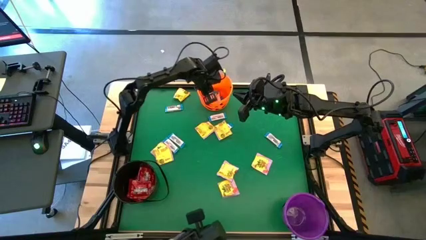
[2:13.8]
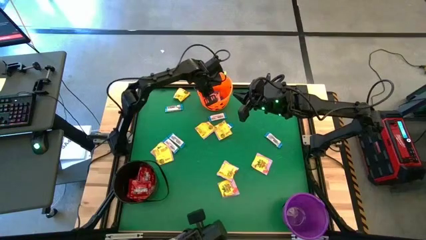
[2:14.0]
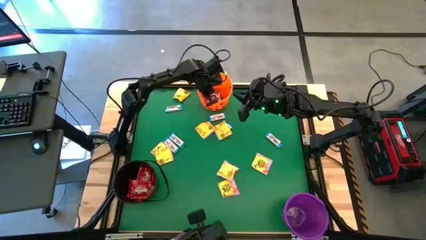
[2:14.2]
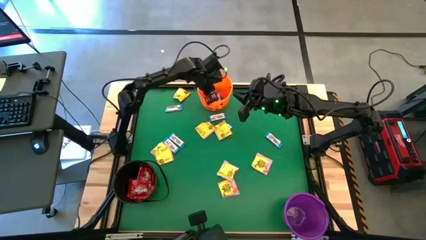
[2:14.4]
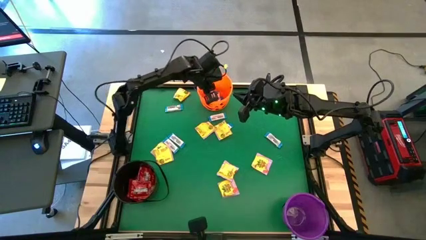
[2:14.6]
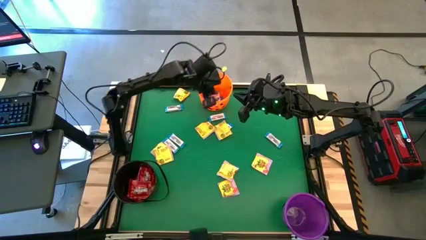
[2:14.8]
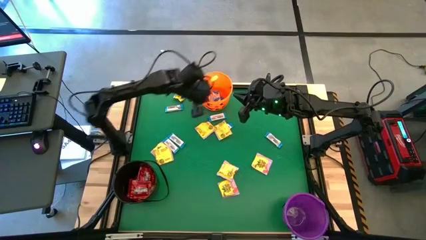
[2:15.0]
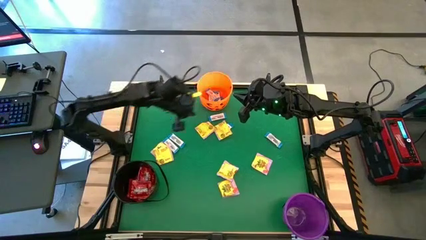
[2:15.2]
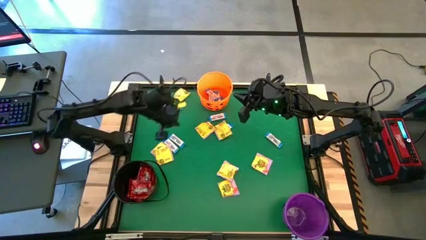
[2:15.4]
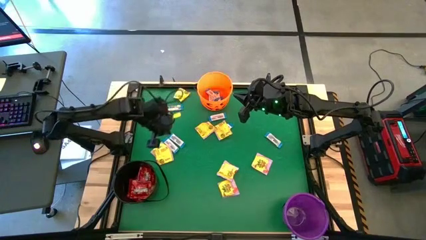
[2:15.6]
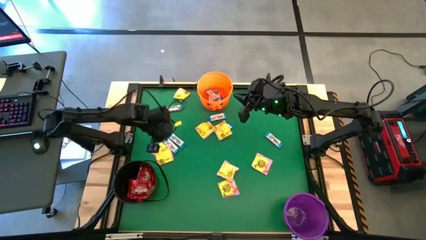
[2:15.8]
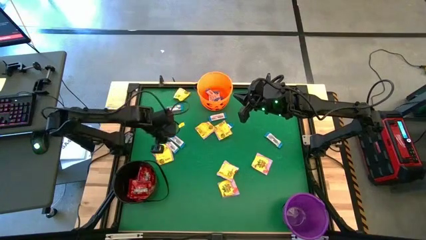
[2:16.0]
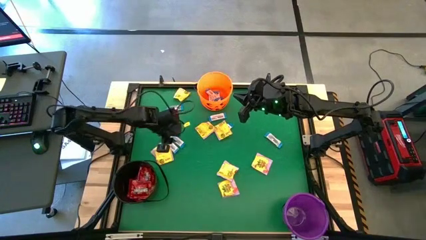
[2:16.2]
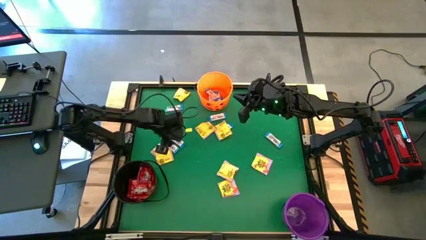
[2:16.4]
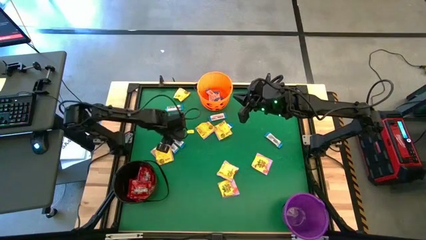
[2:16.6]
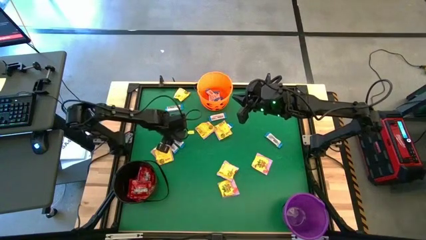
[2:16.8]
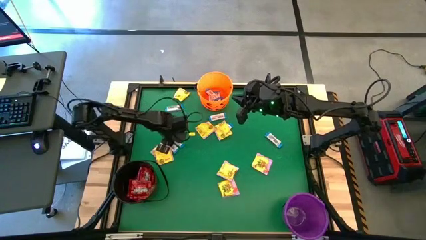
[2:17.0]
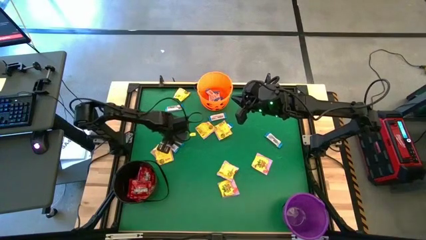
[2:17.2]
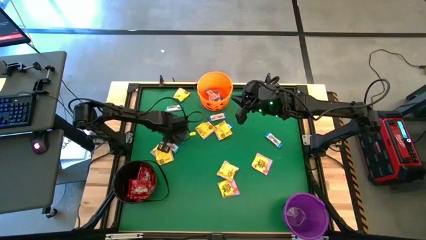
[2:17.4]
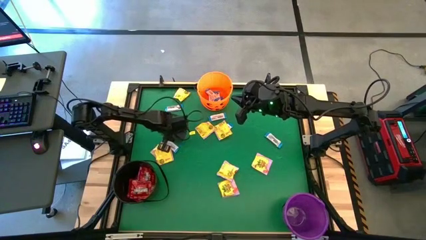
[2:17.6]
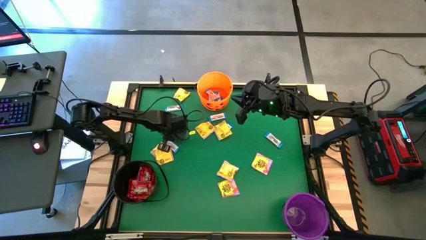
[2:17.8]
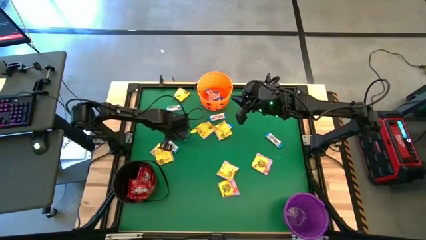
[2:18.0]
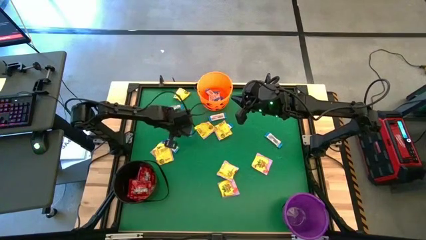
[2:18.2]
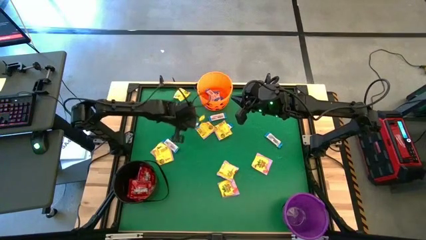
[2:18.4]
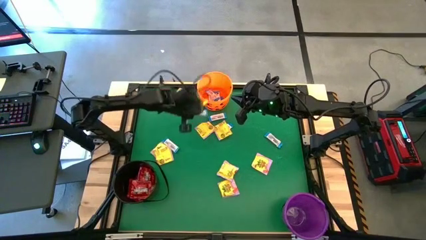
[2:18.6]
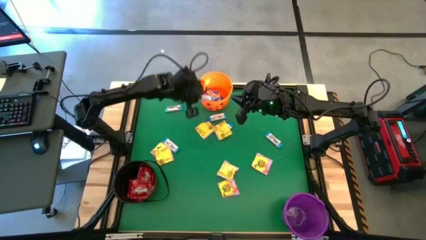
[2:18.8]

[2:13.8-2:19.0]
Task: Sort candy by brand, put in halloween buckets
Put the white chocolate into the orange bucket

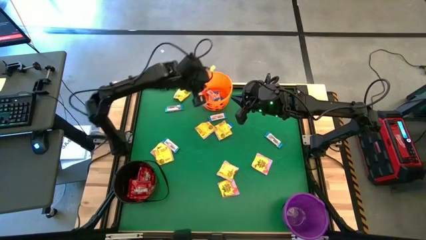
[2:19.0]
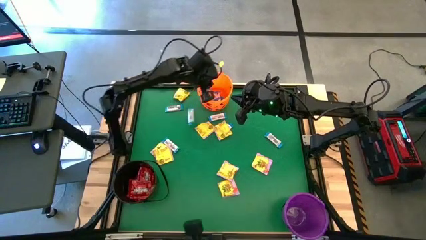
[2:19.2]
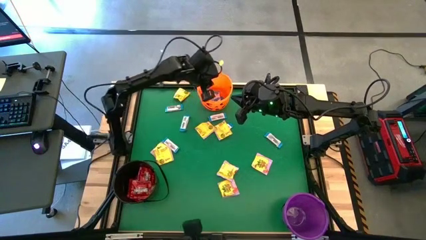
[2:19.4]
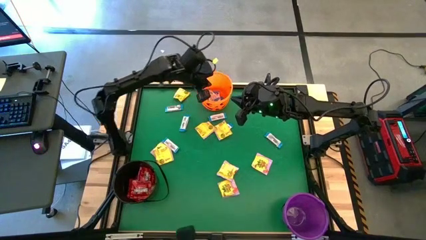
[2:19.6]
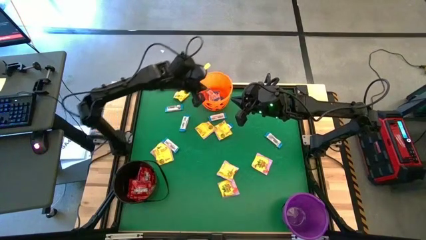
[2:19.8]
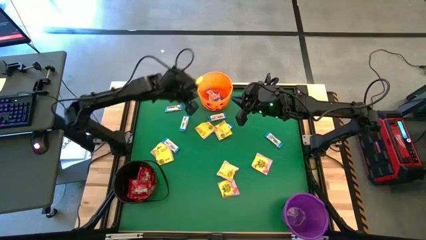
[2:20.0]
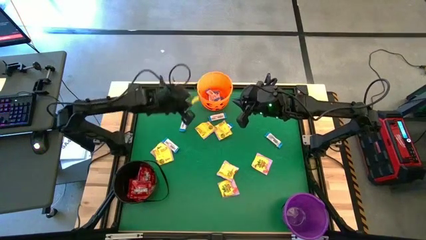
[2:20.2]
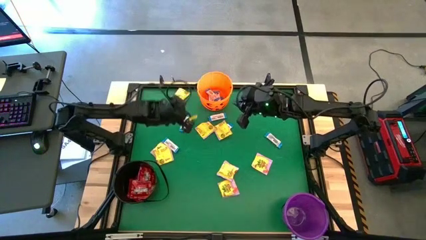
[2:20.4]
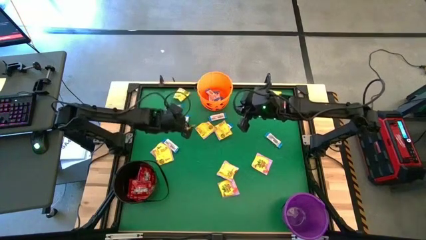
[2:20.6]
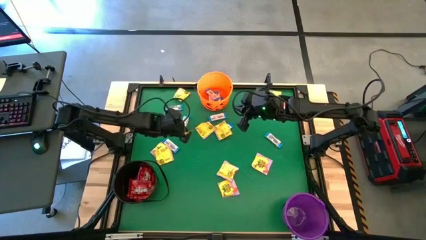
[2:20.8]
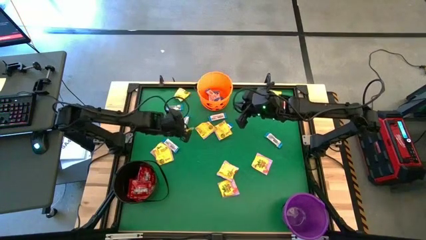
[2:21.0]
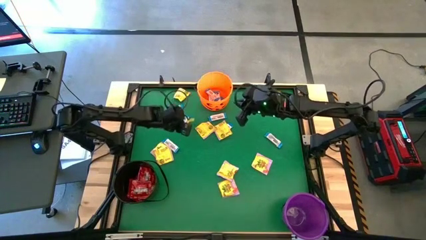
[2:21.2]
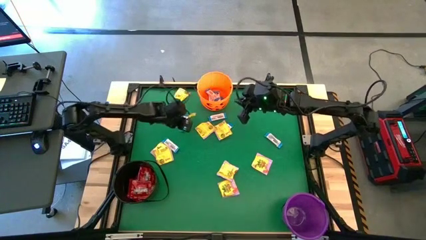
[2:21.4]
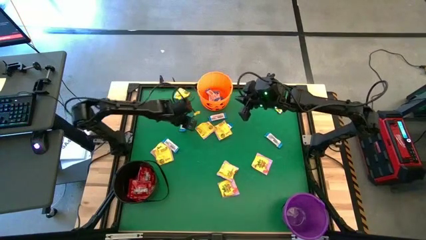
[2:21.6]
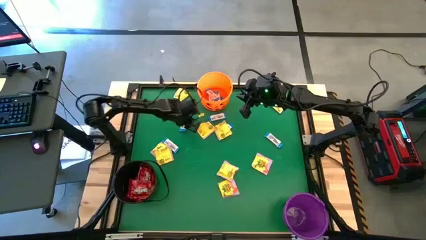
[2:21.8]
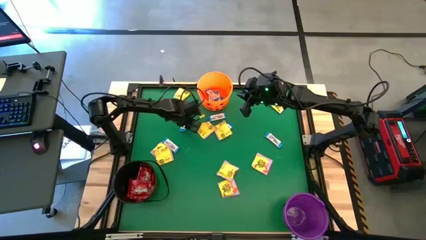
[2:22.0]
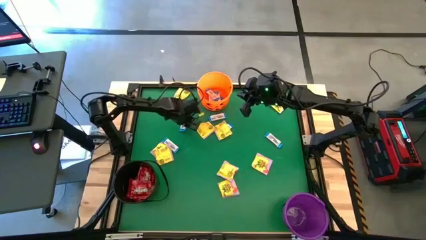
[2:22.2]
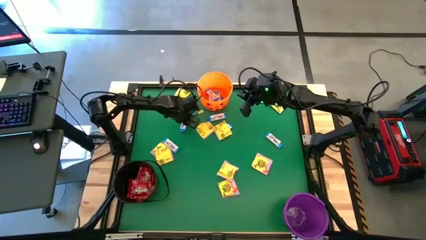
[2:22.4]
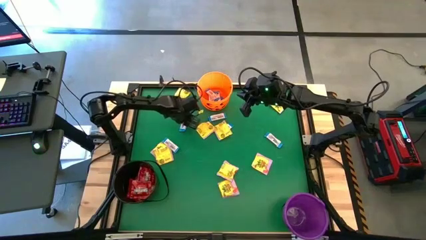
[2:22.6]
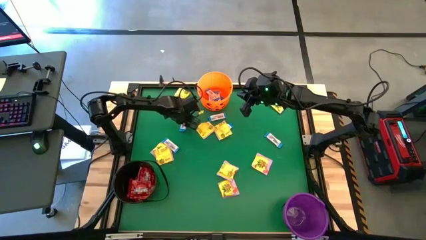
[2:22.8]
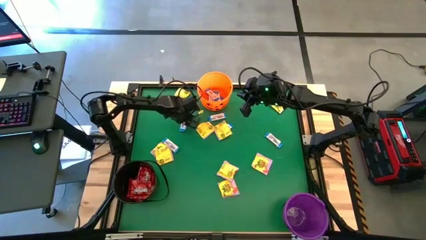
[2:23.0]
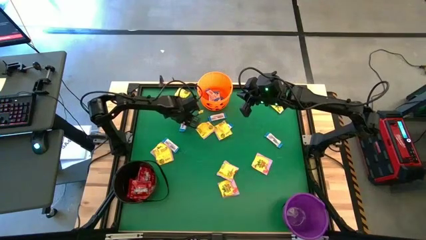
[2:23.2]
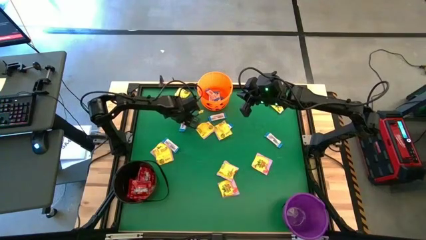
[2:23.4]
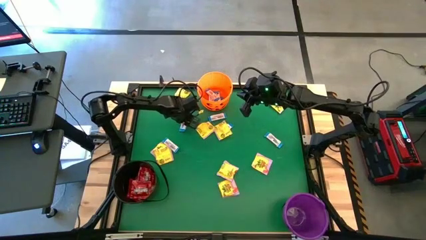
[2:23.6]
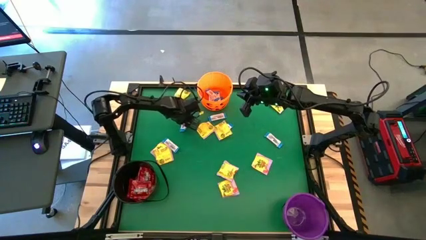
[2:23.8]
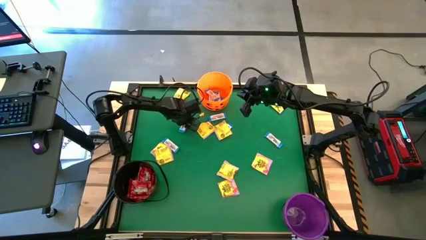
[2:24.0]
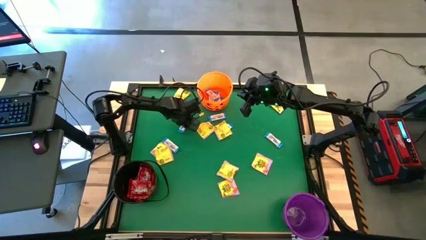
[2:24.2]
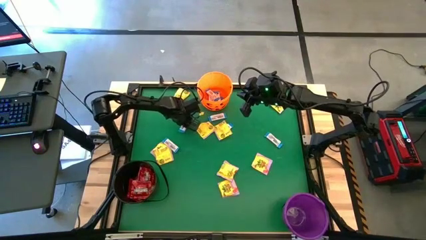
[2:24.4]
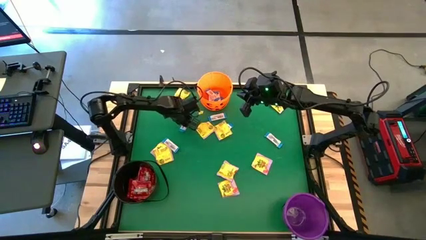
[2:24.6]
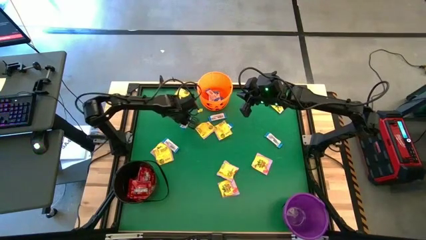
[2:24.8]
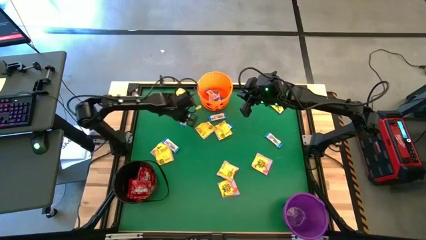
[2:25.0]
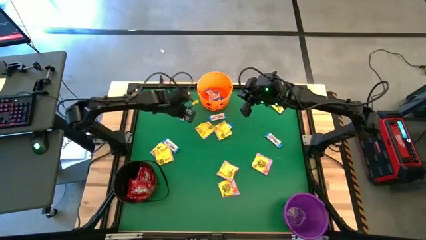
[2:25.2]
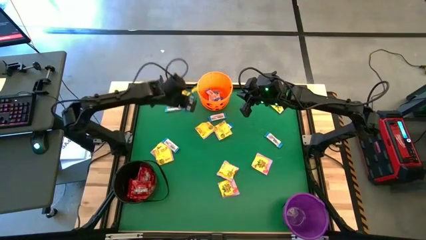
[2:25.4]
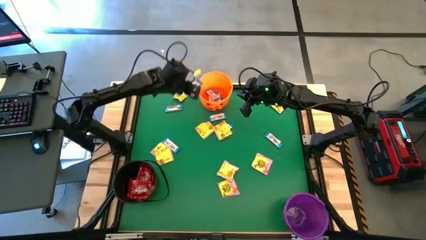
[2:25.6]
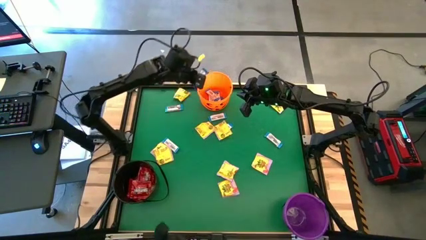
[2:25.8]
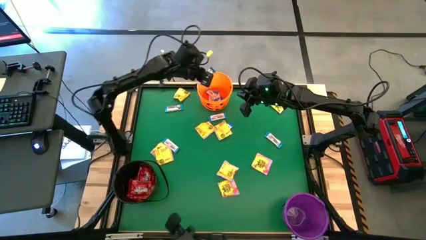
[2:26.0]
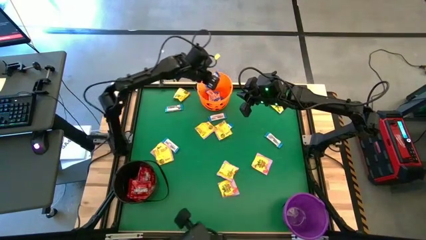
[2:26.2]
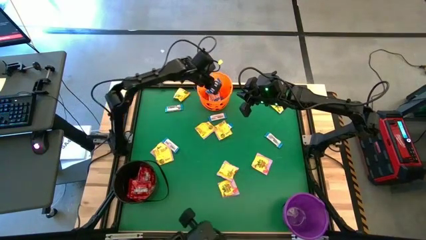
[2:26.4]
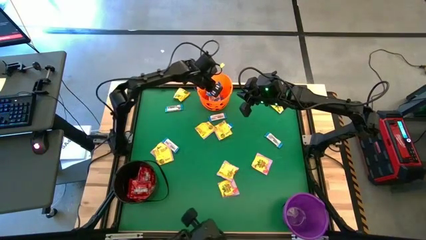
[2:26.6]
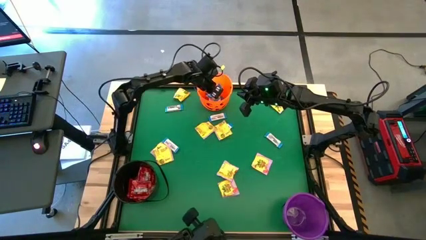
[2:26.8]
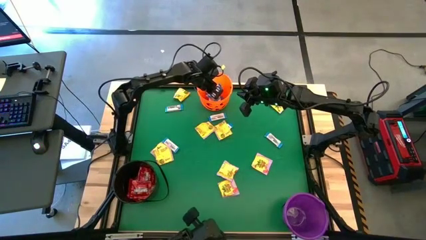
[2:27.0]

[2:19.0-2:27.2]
Put the white chocolate into the orange bucket

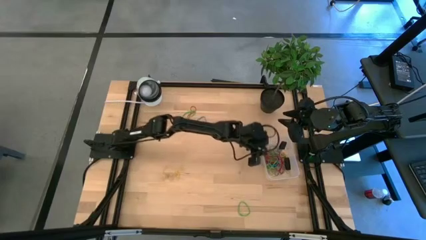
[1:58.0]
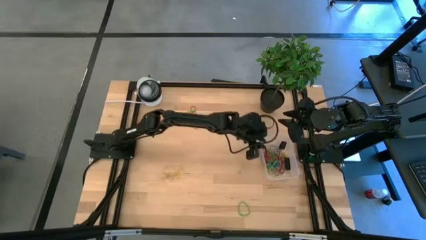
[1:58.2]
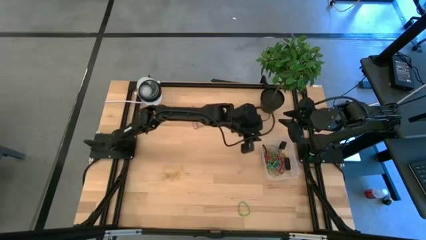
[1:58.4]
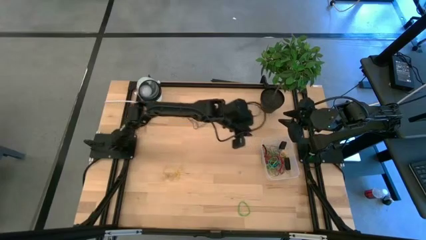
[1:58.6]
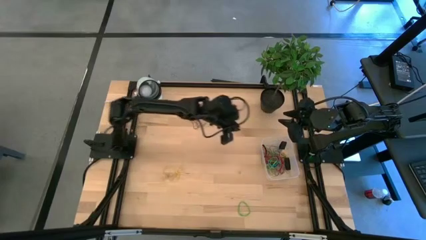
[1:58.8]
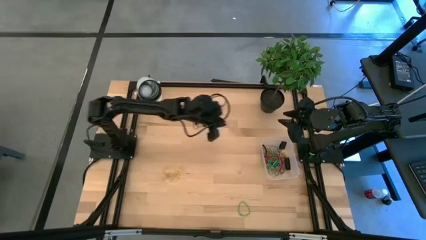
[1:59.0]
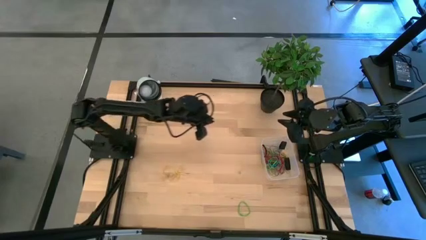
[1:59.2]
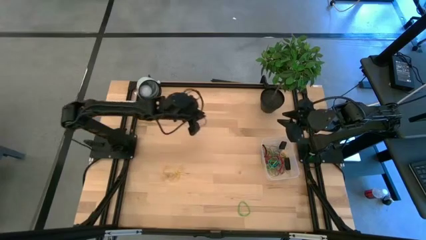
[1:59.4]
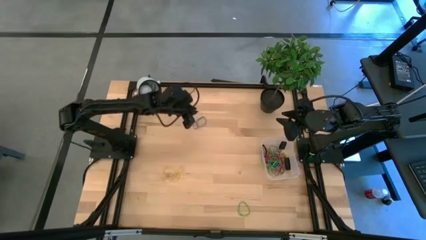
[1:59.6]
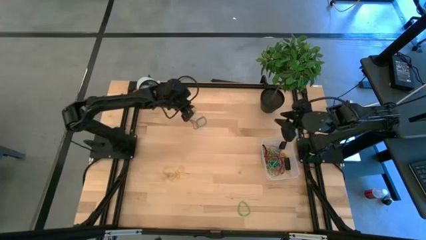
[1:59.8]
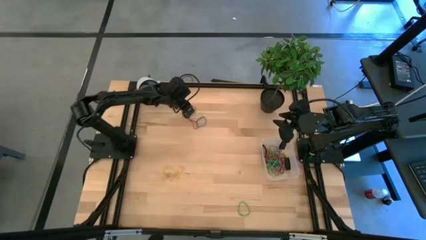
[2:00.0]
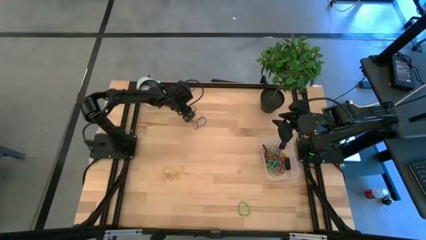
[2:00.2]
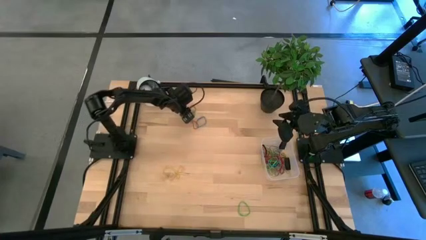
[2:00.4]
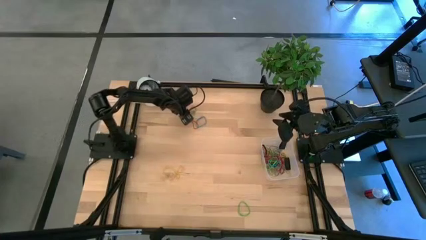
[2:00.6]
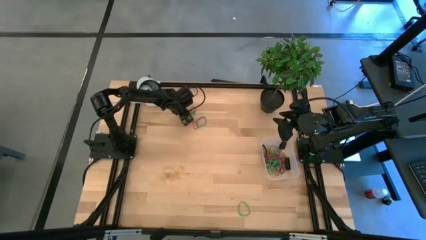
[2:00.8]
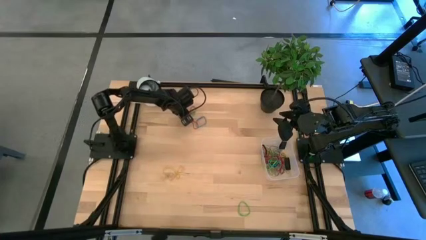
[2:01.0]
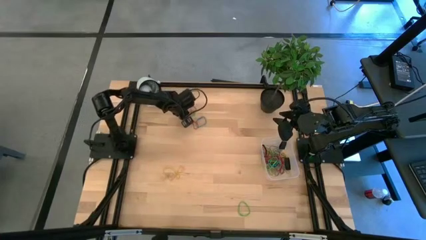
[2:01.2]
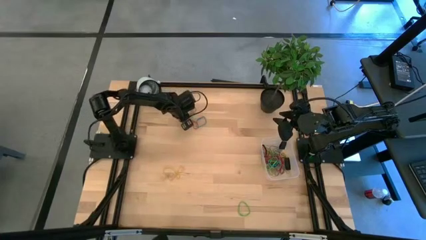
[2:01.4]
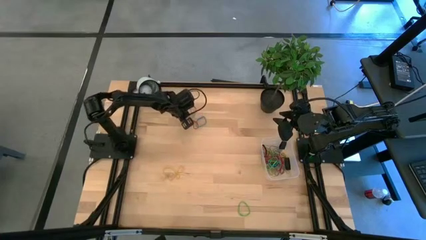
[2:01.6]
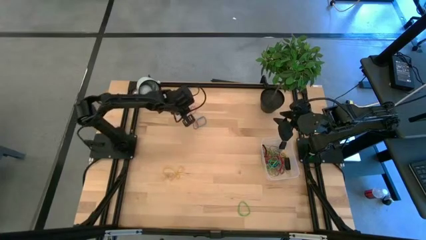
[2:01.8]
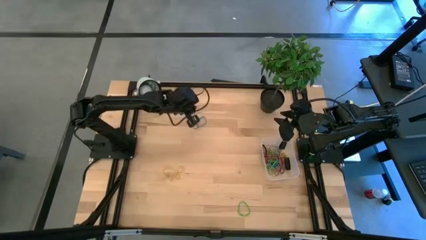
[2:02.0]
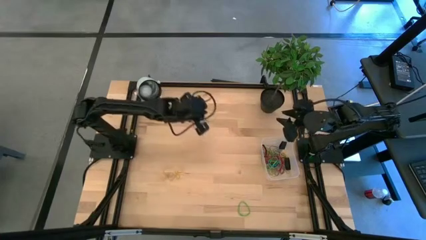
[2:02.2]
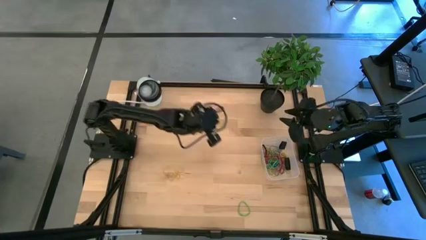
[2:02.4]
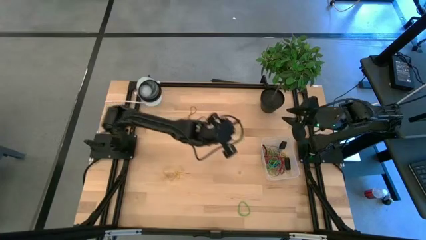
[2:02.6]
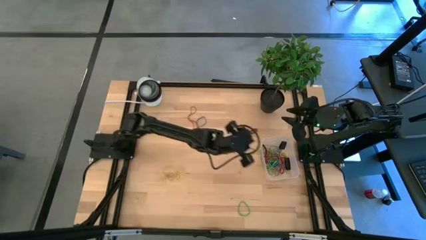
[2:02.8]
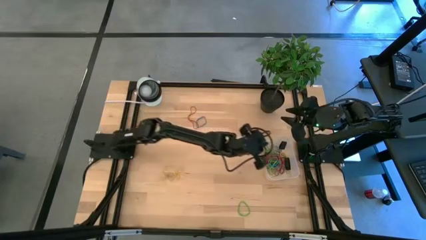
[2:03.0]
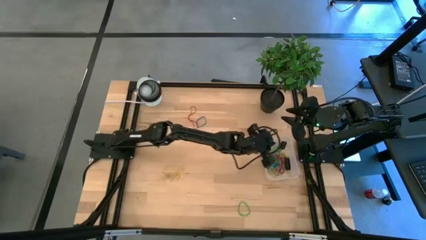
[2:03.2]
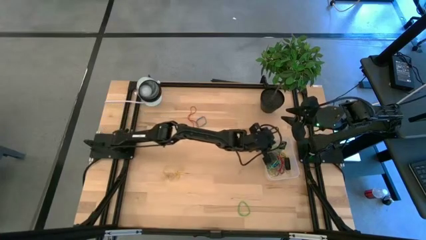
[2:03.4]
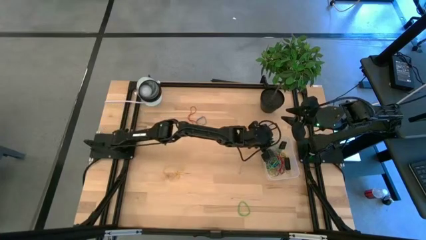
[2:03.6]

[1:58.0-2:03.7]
Task: Pick and place rubber bands into bin
Put the green rubber band into the transparent bin
